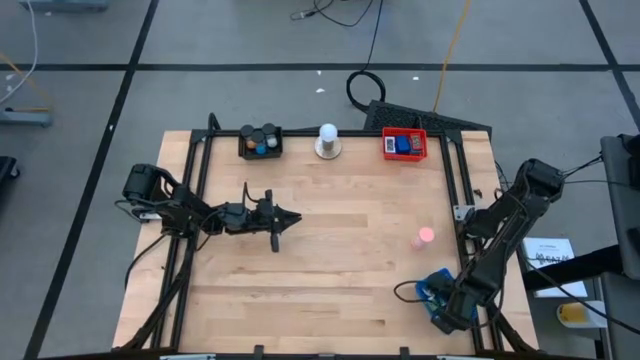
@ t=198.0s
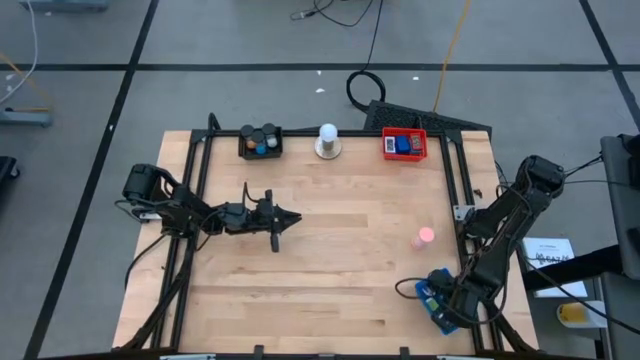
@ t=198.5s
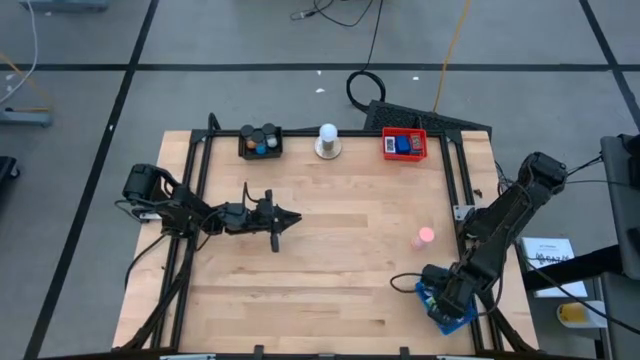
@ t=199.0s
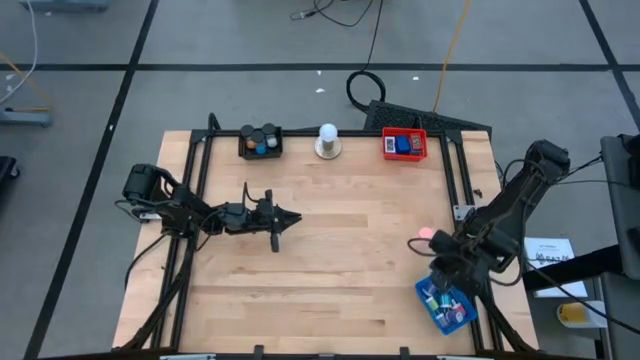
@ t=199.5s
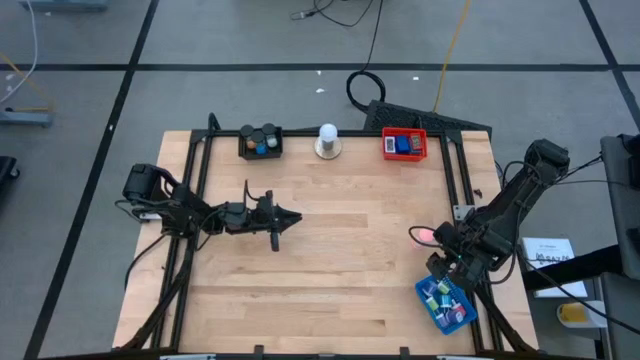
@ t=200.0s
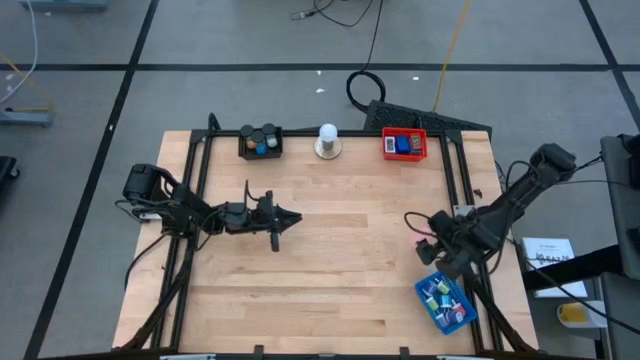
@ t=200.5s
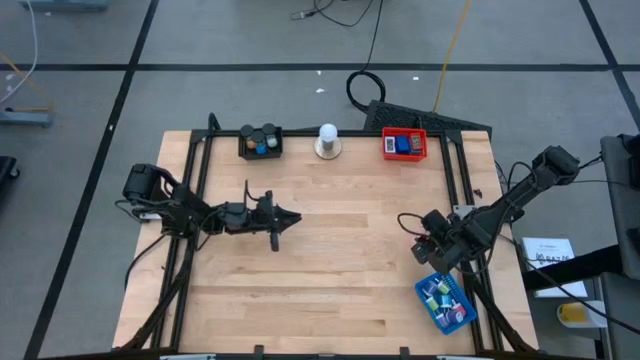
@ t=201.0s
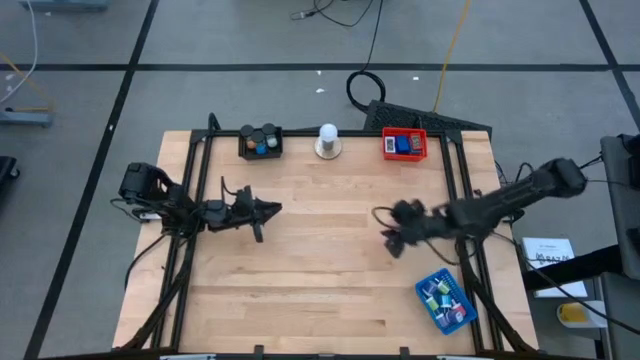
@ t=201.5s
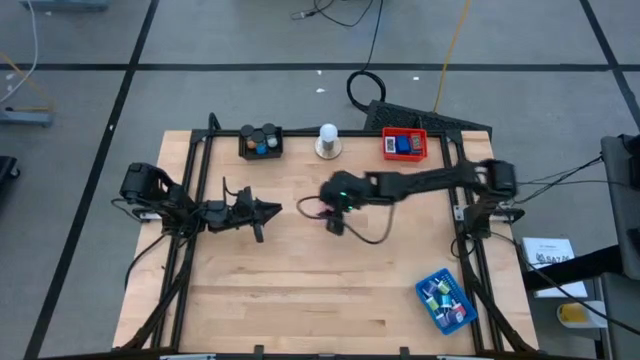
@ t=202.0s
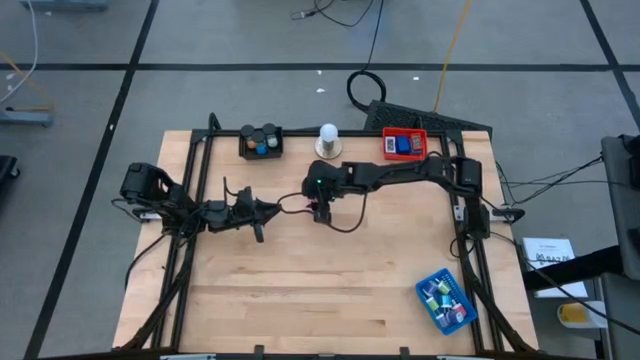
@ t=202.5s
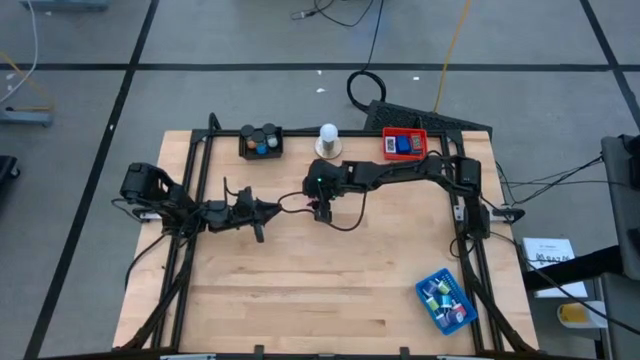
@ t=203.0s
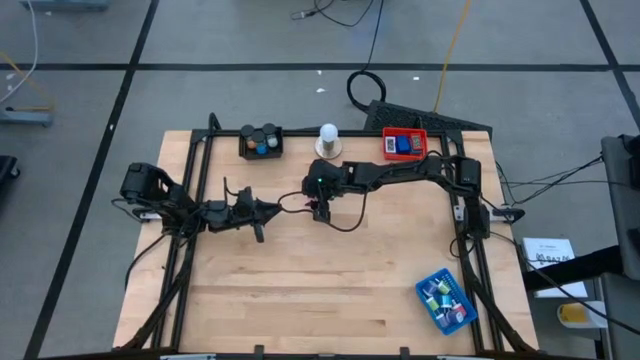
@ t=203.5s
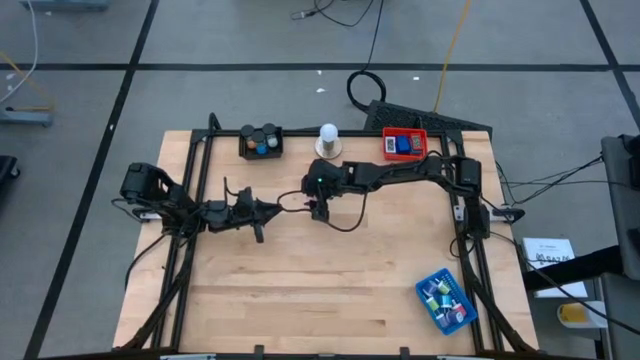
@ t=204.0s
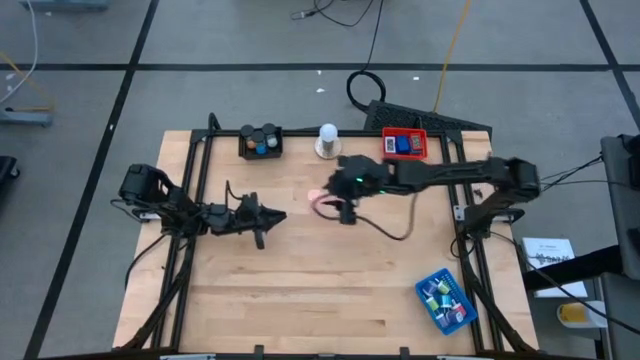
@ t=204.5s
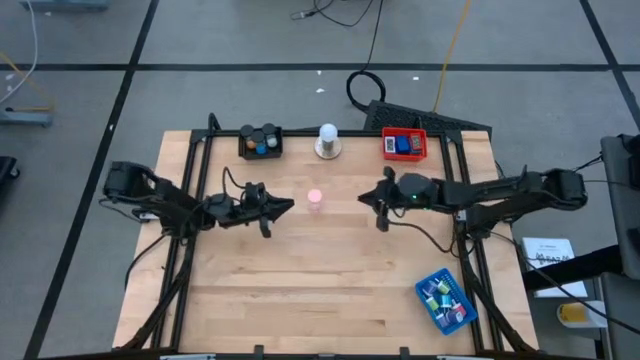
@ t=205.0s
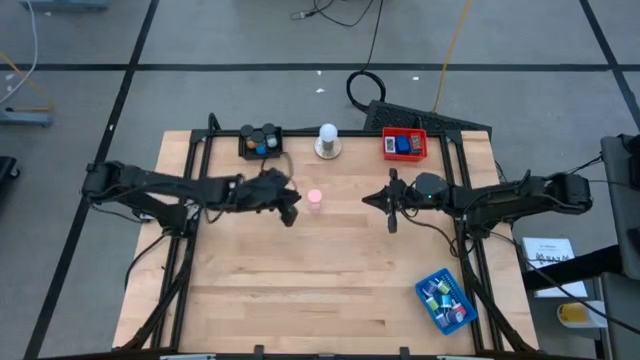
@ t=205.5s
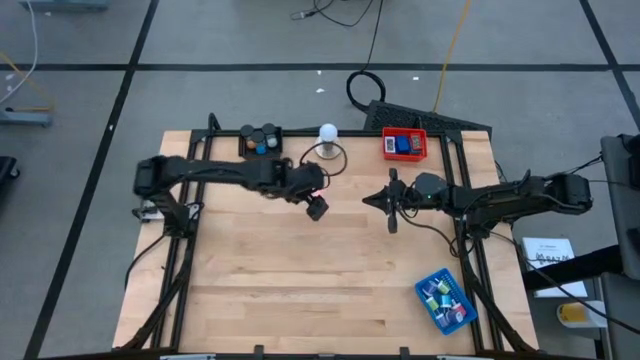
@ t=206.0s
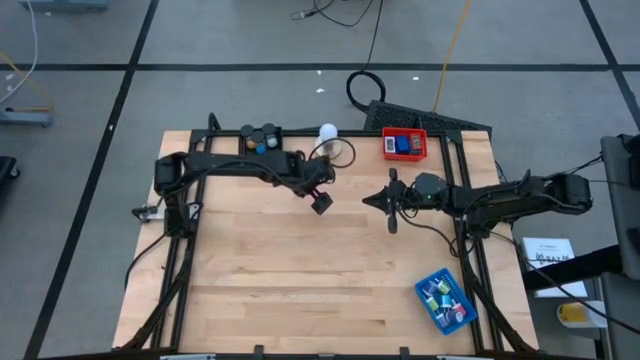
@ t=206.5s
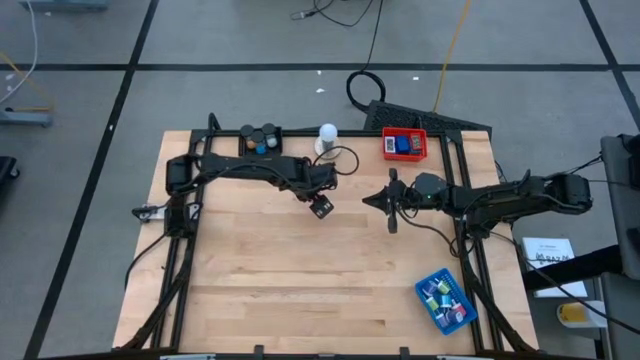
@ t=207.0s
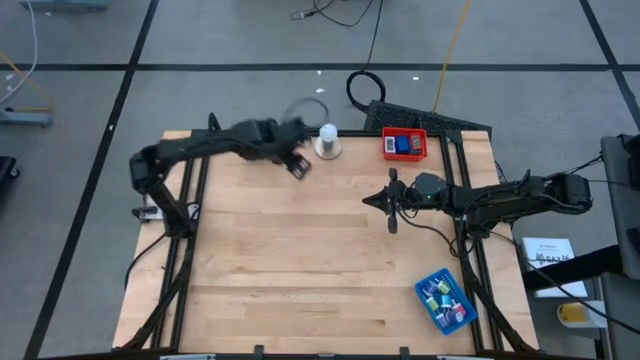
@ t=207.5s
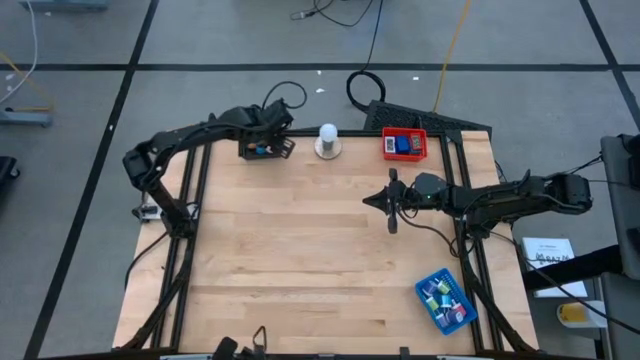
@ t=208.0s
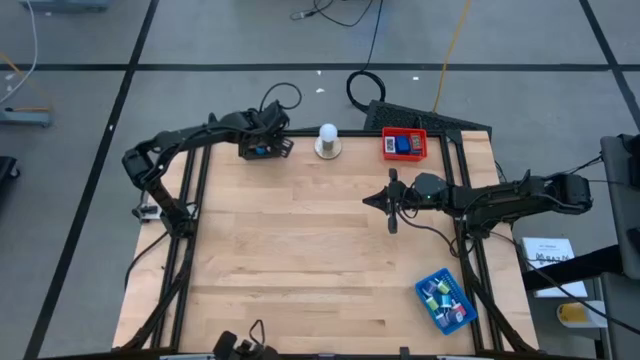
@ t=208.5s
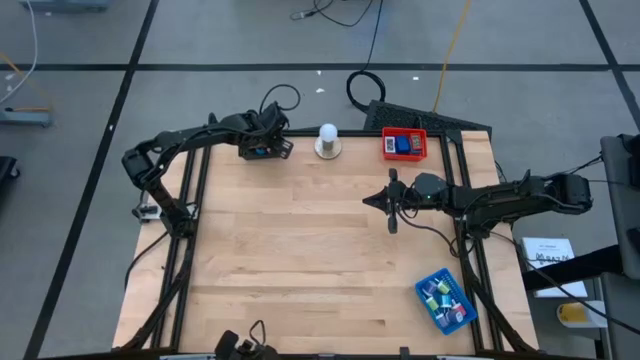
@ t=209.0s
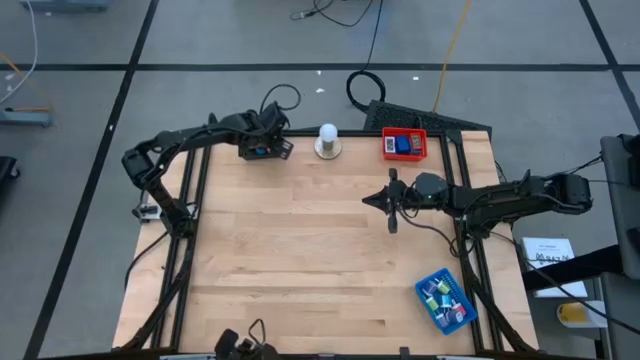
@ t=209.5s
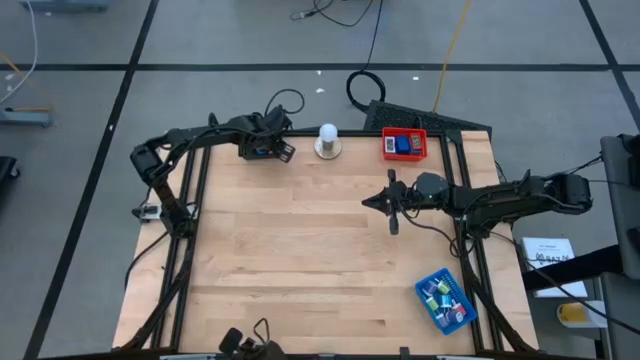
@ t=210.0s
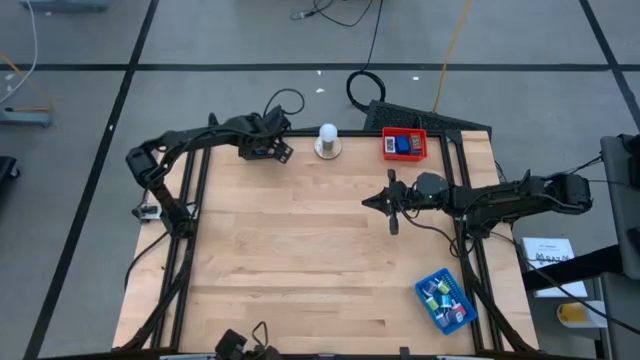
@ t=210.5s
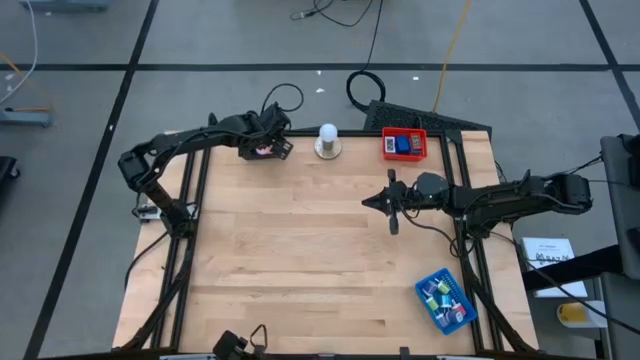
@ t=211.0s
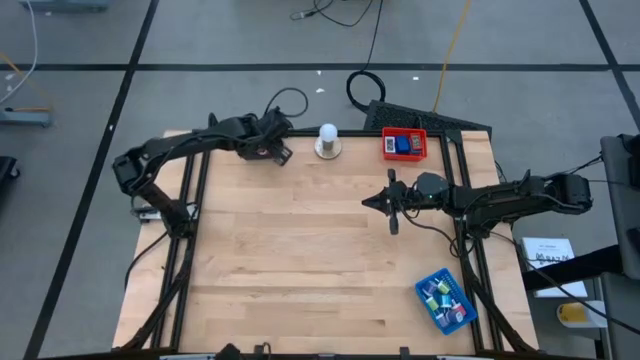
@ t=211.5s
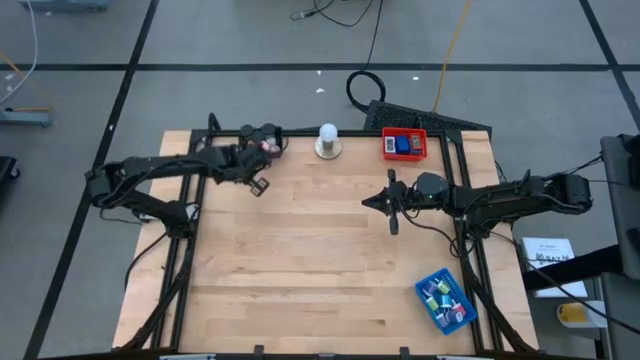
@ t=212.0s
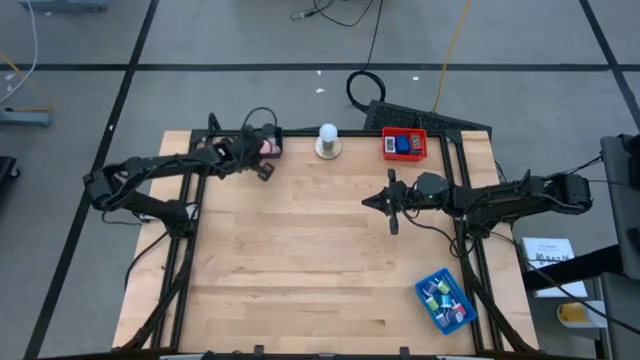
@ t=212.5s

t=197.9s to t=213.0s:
Task: Pick & Place Office items
Put the pink hourglass into the black bin

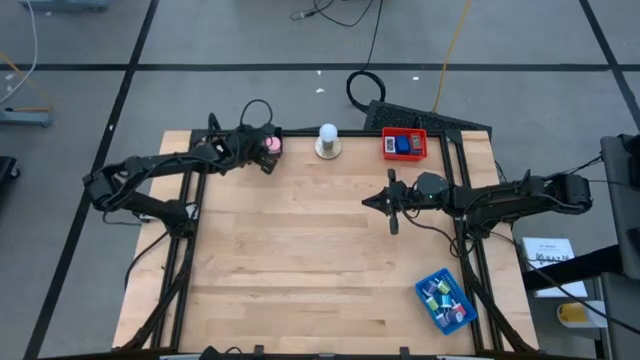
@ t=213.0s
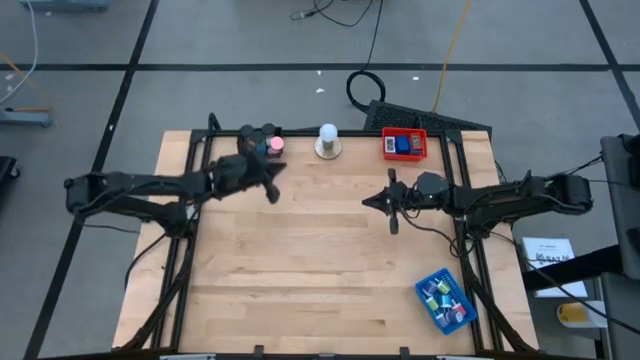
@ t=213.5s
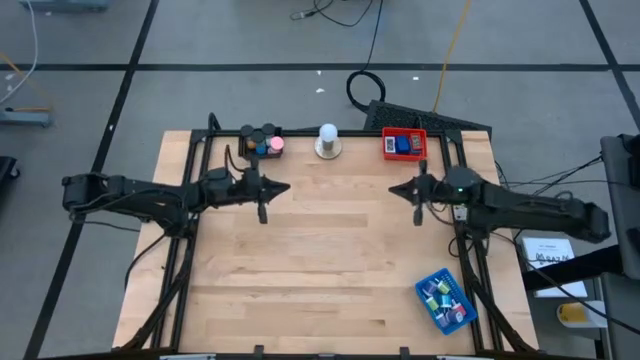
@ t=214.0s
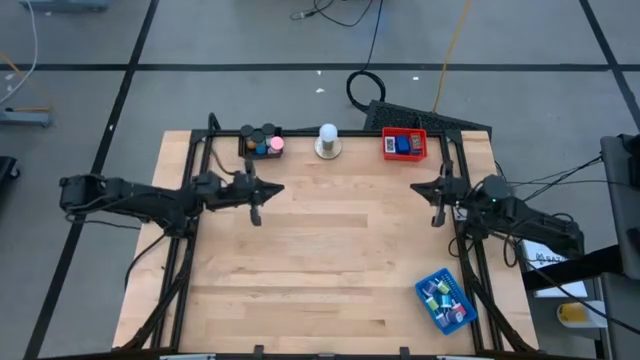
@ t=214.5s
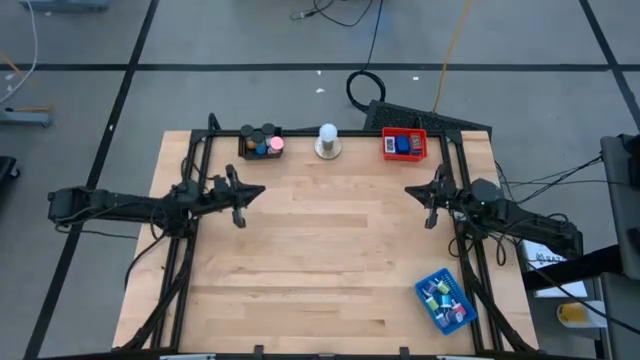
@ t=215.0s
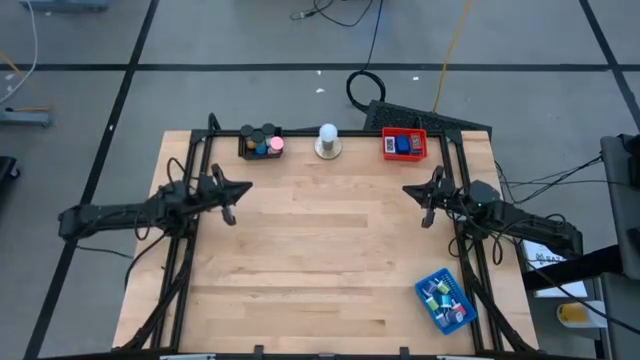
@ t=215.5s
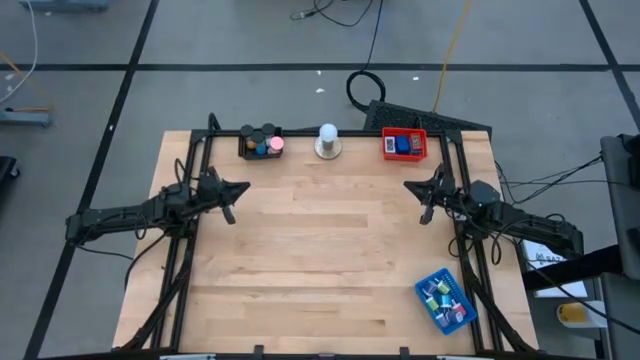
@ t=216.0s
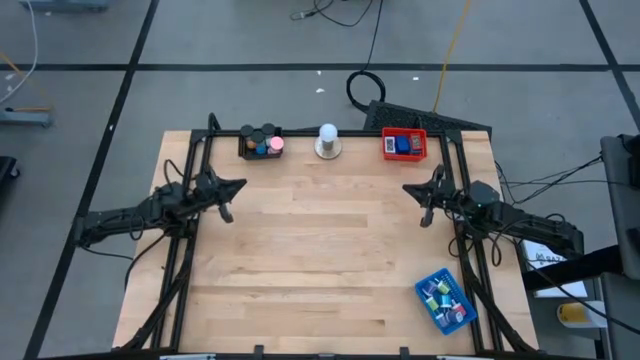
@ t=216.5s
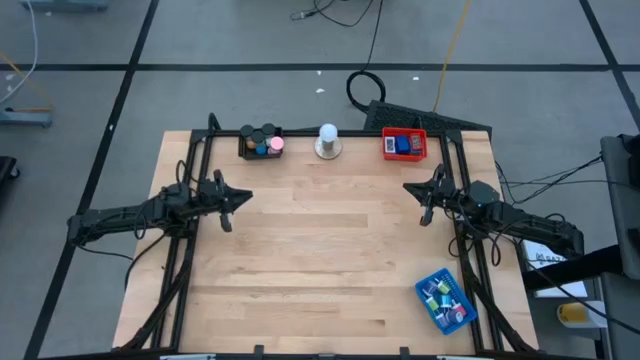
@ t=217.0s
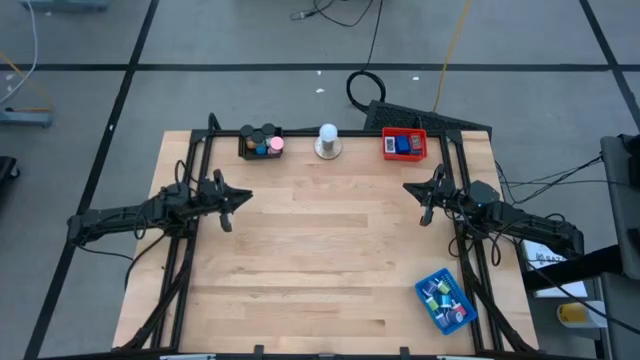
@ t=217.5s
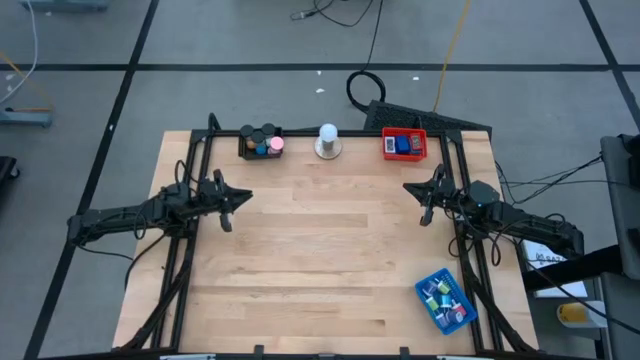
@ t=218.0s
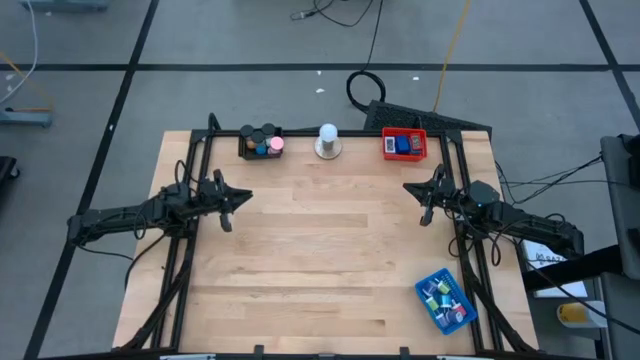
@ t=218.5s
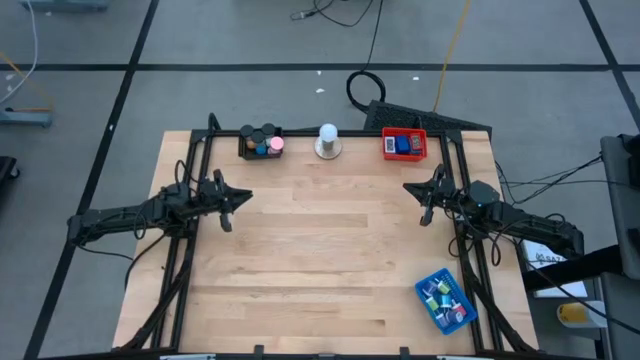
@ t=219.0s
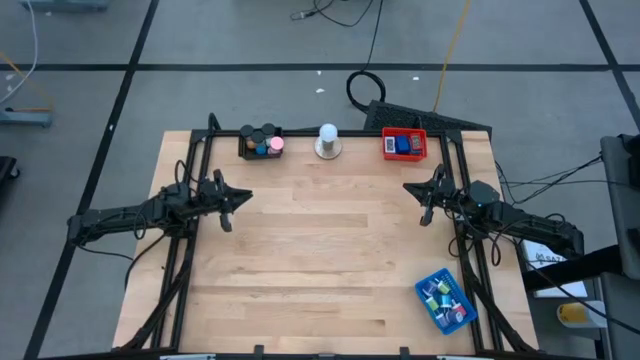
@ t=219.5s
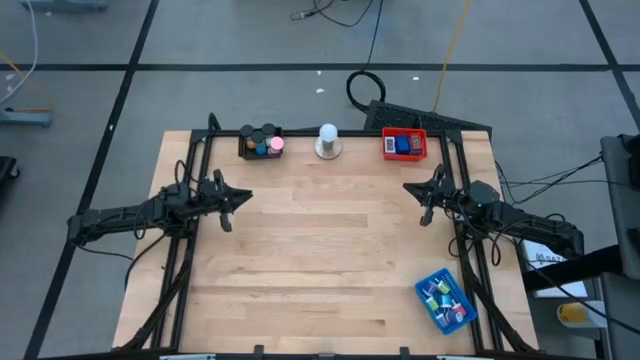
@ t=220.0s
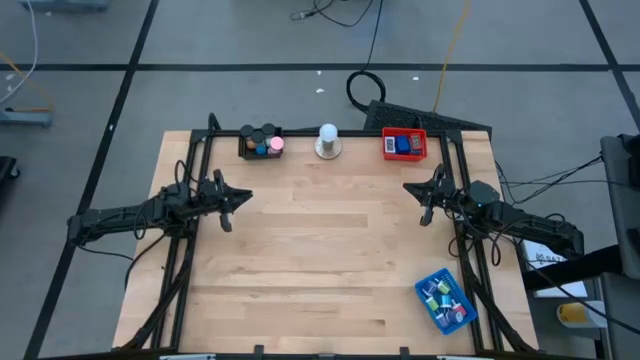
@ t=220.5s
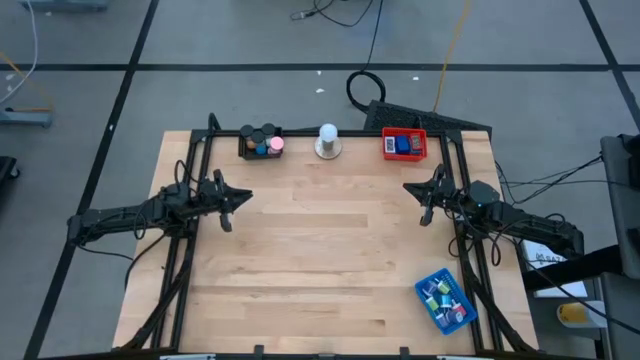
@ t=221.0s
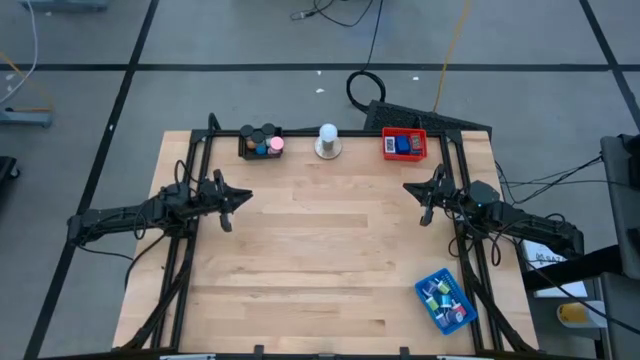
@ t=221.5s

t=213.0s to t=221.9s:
Return to Home Position
